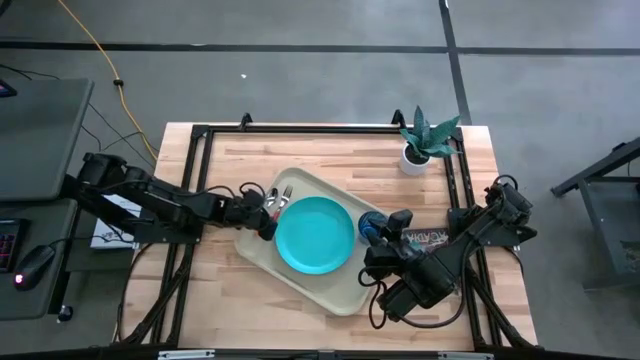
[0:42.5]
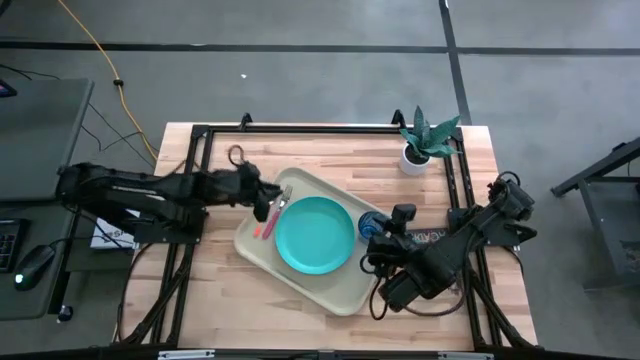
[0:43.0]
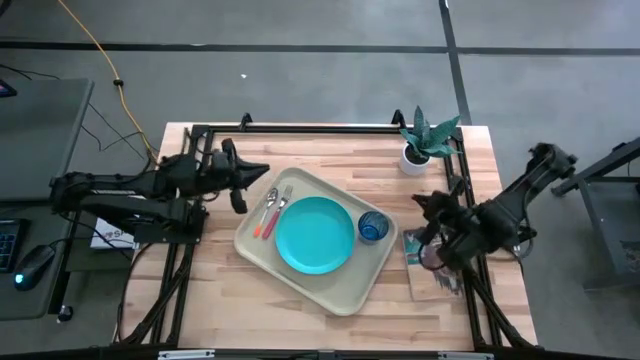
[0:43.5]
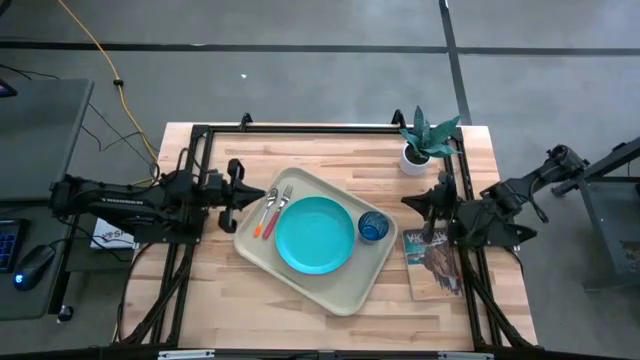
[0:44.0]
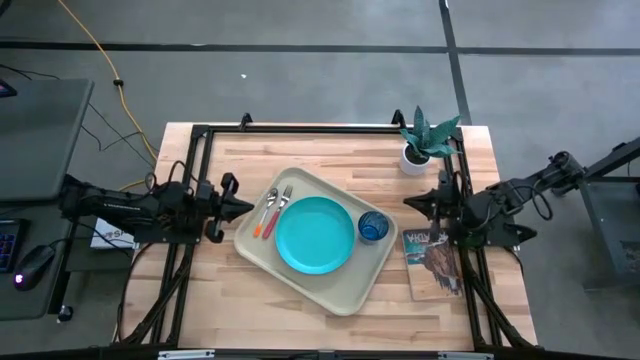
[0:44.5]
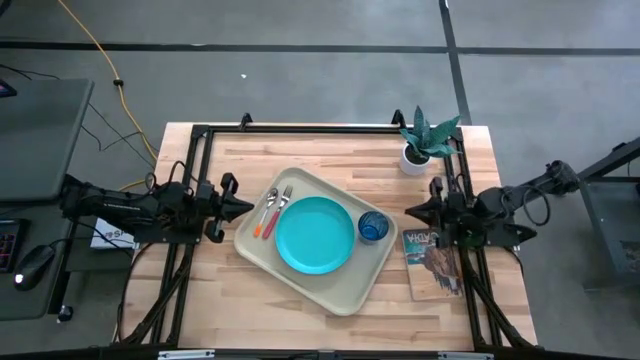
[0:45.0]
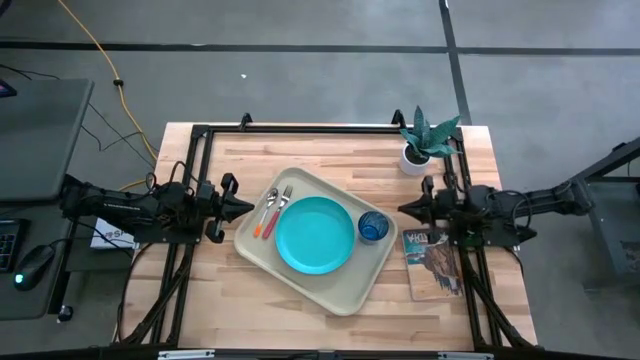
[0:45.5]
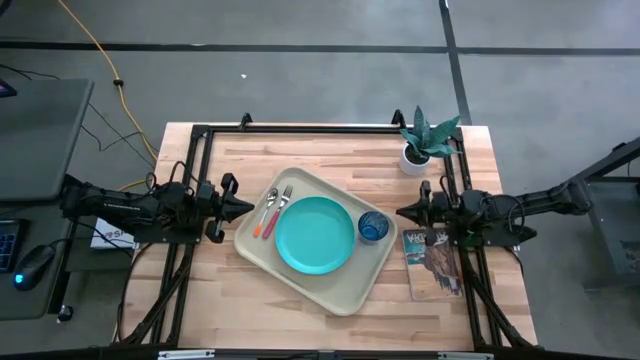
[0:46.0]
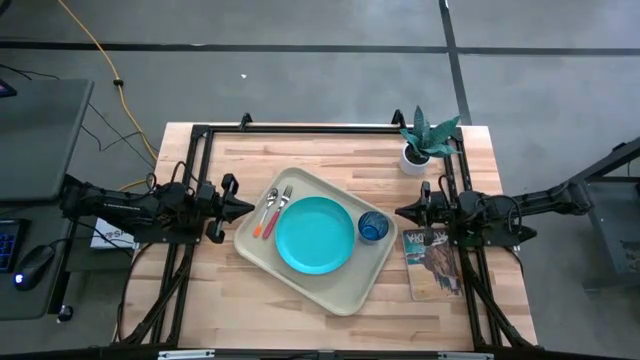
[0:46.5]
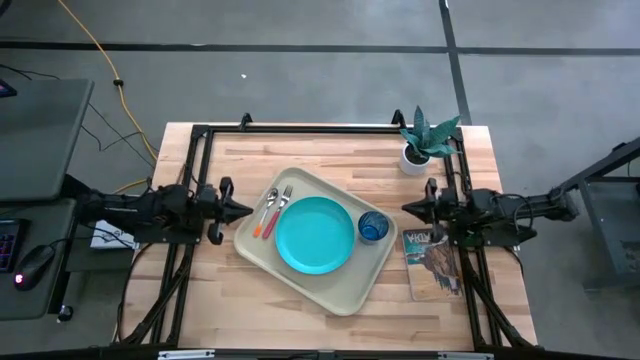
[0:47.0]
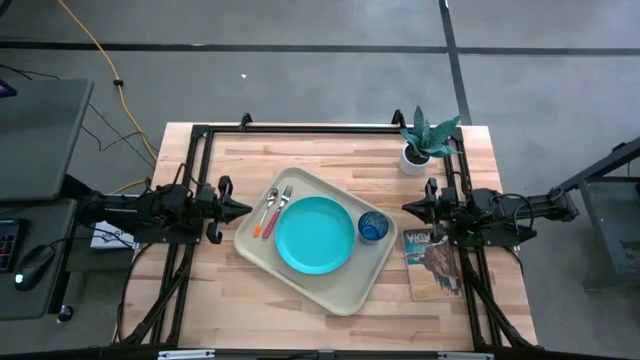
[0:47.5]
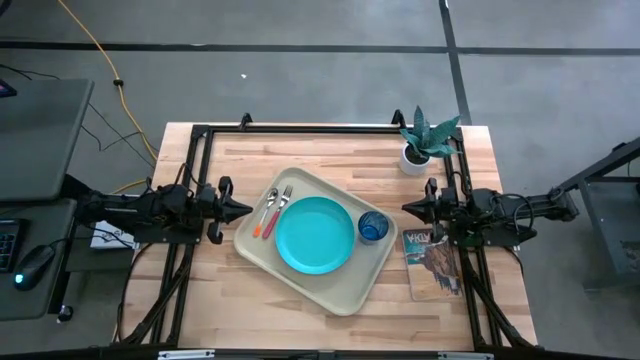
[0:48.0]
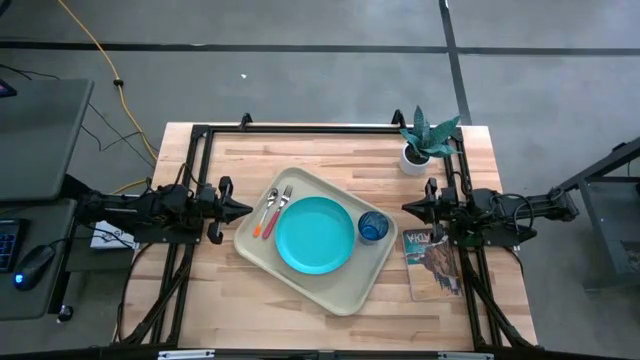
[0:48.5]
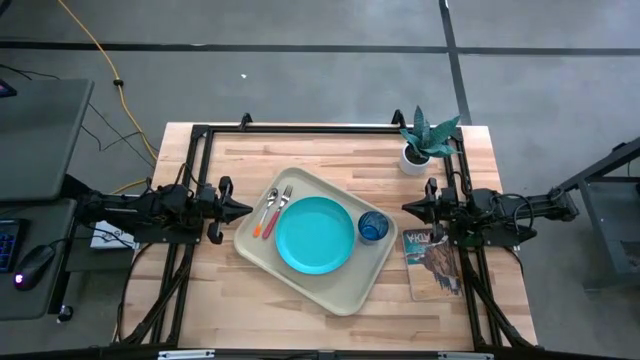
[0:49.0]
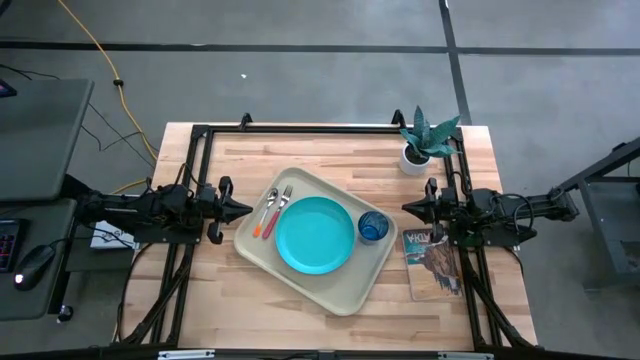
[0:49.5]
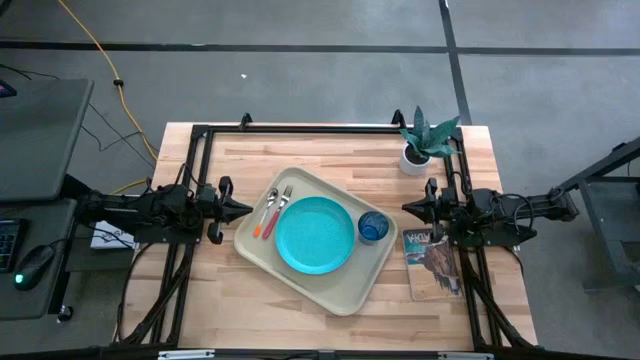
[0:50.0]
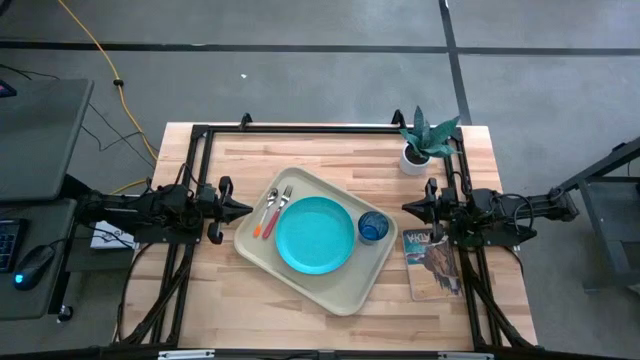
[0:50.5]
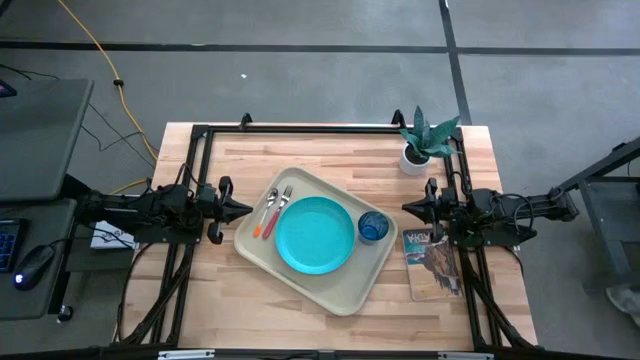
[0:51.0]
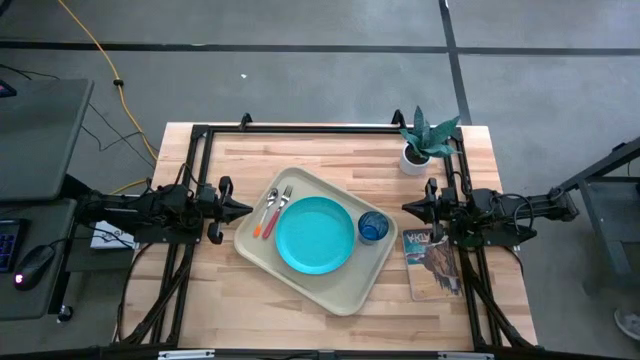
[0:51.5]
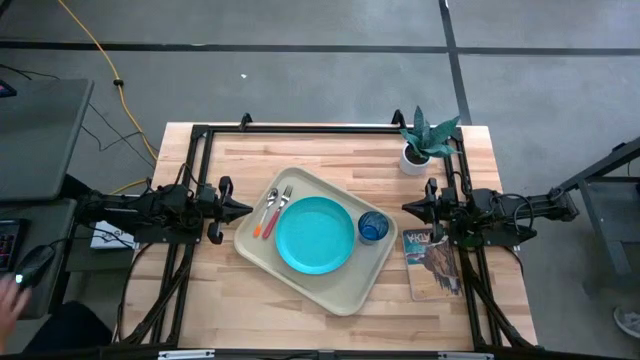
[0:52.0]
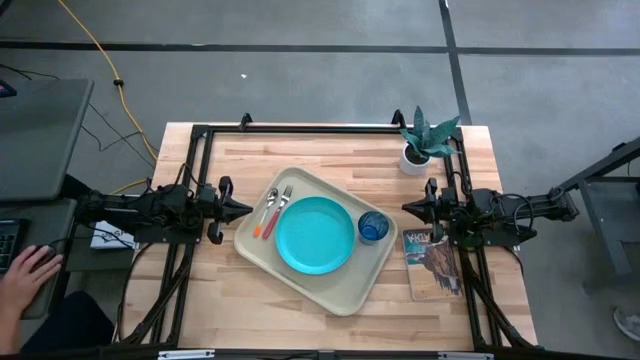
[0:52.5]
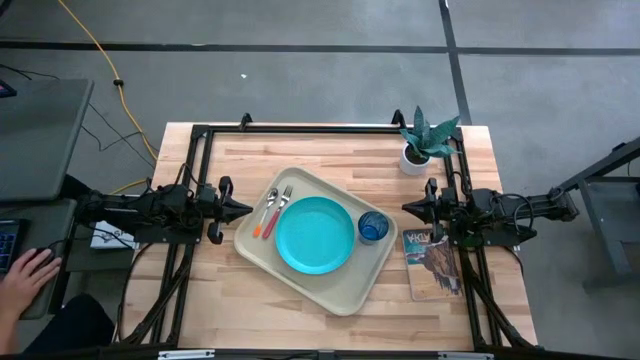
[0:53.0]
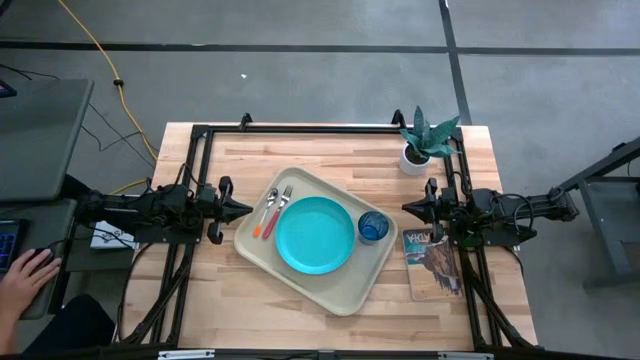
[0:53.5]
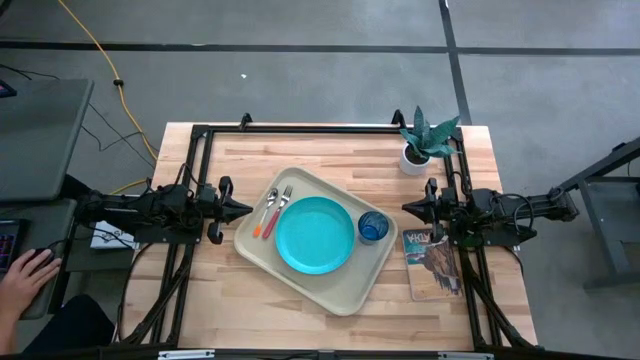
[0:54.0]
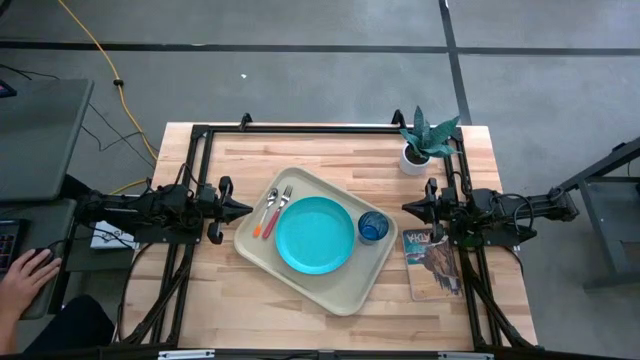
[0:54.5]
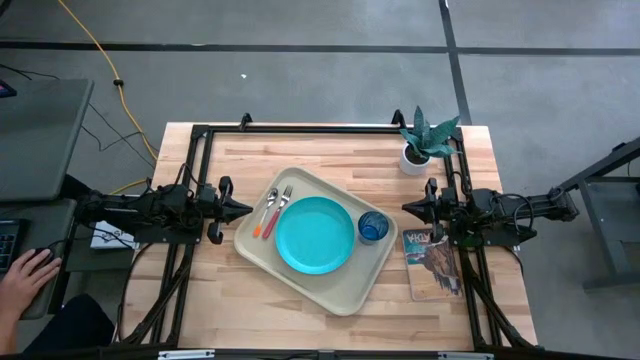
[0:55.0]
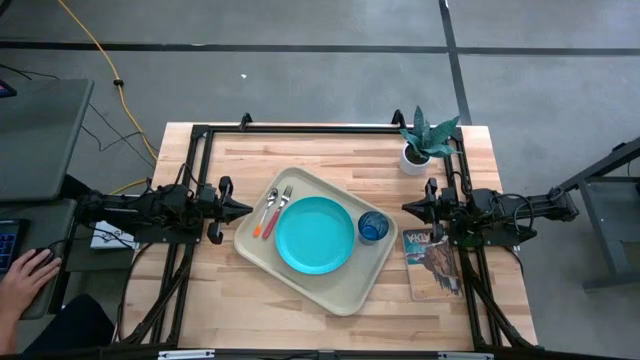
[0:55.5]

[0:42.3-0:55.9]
Task: Pick and place plate/cup/fork/spoon on tray
Return to Home Position

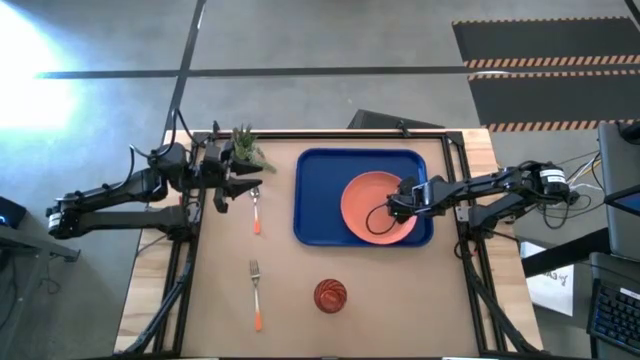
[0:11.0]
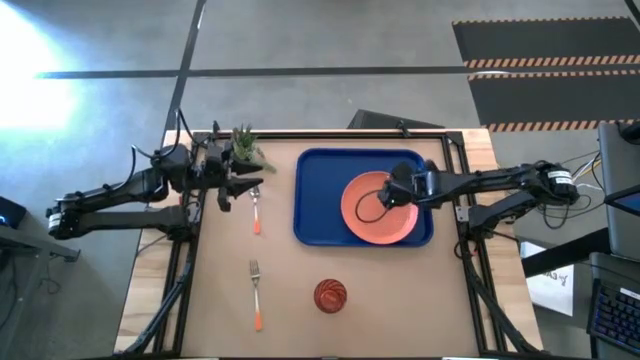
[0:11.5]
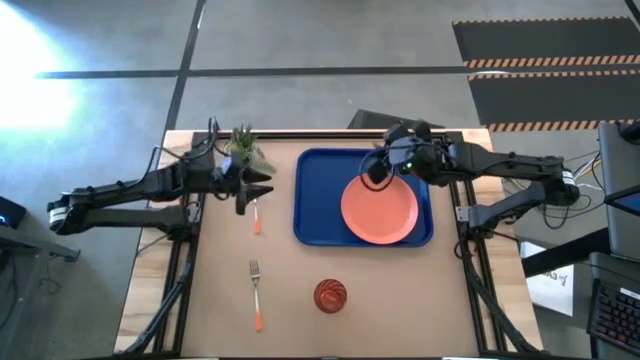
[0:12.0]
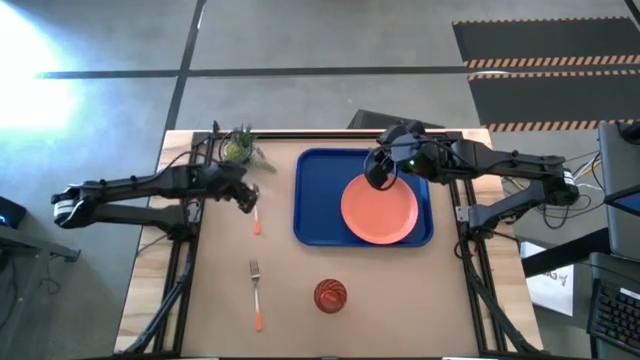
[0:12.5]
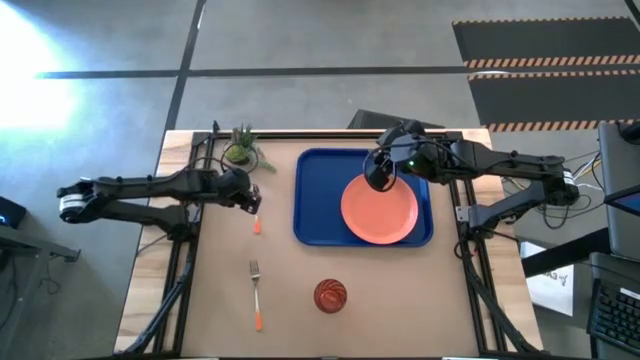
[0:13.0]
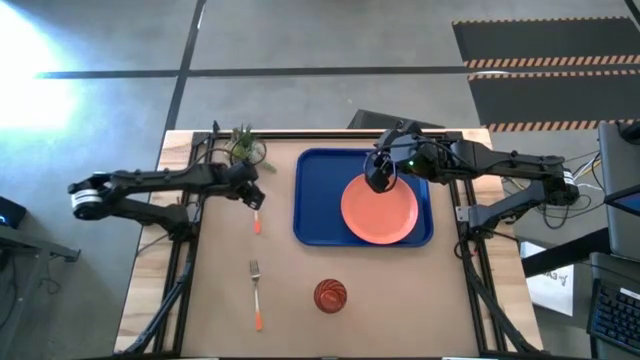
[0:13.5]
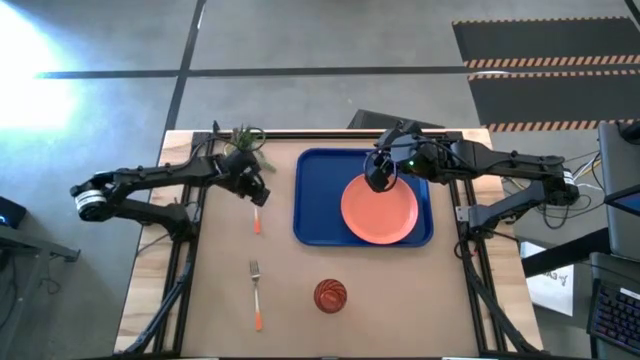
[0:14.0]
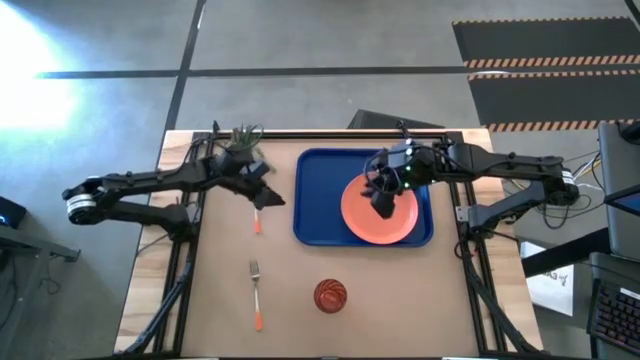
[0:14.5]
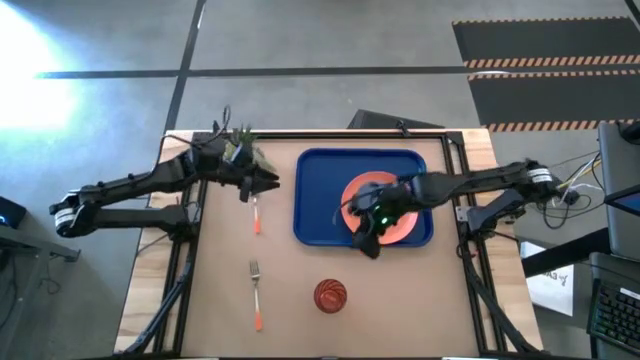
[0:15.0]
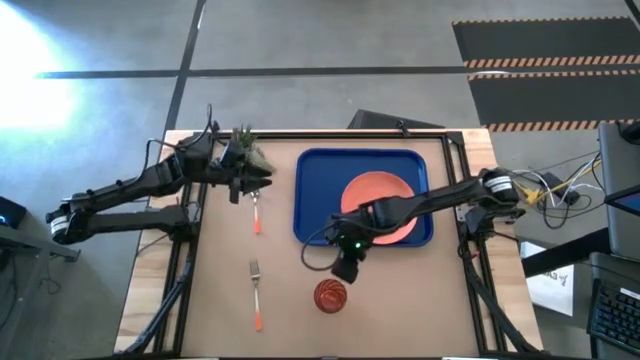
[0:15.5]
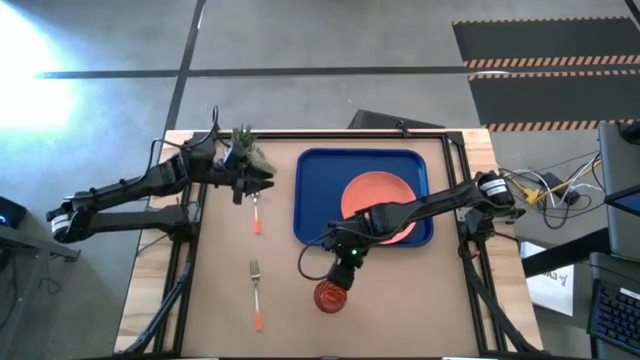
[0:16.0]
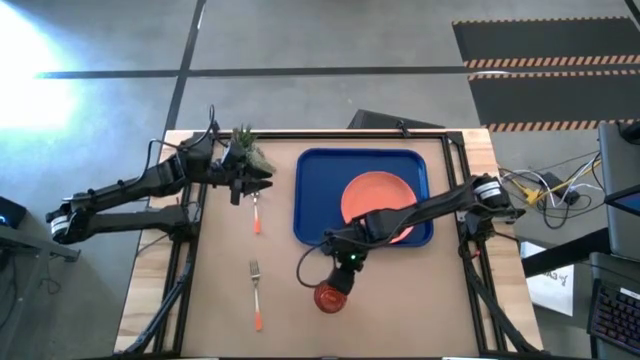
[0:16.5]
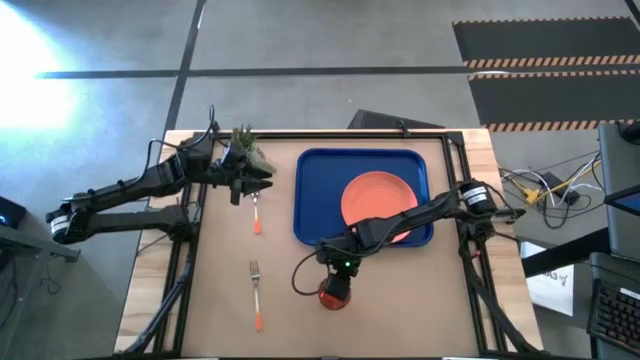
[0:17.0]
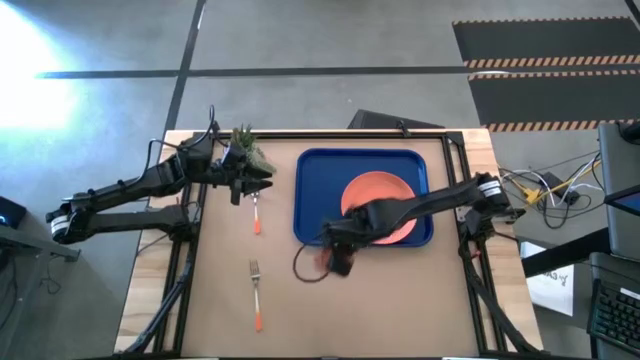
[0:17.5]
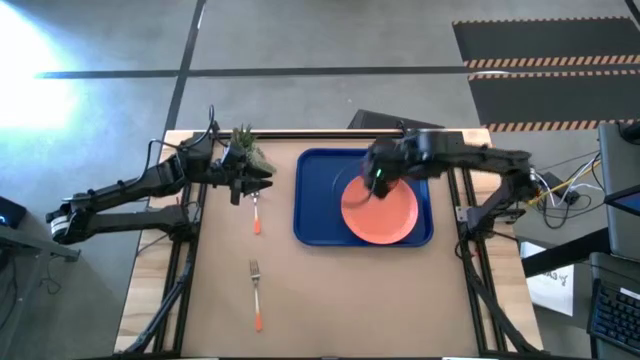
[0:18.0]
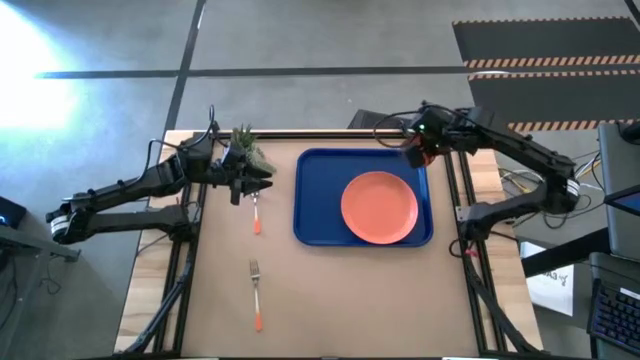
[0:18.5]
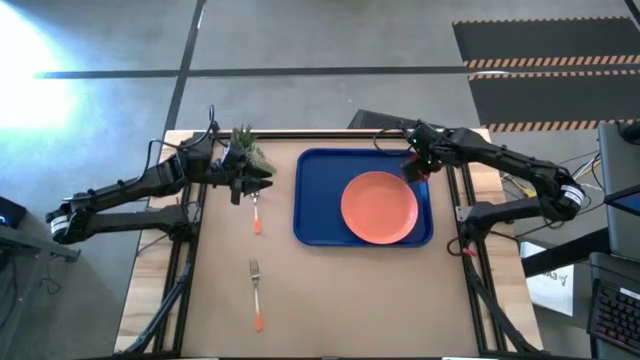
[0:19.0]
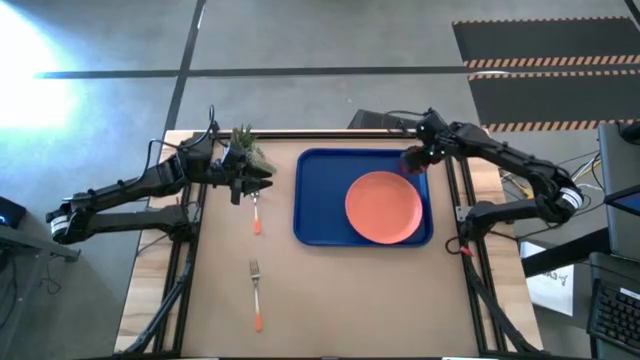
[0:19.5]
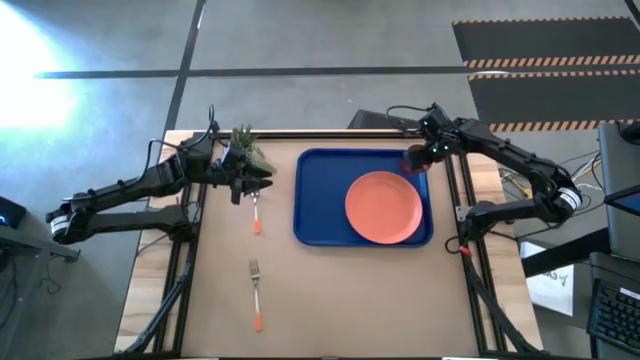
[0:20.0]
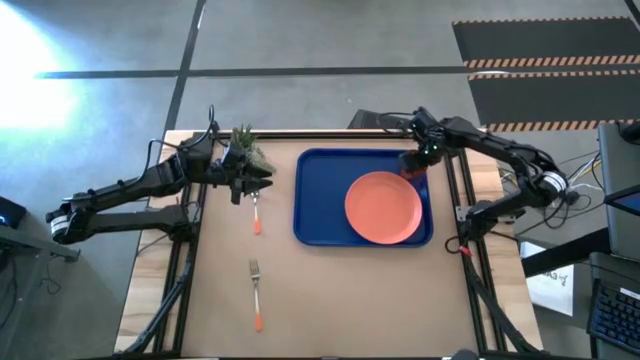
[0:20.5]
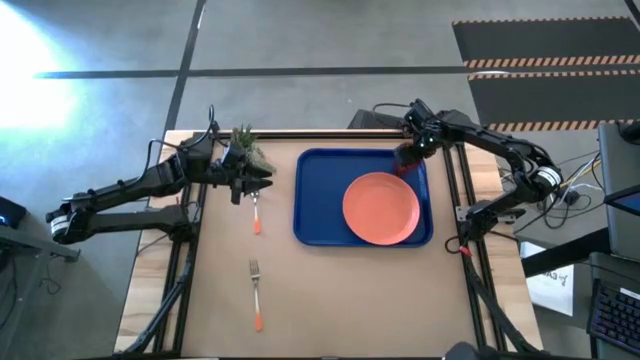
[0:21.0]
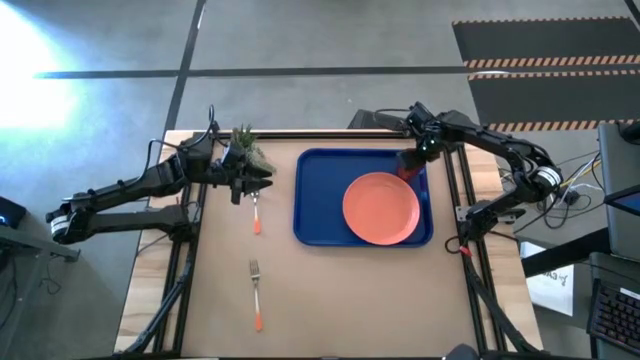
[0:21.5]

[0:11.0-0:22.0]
Task: Pick and place plate/cup/fork/spoon on tray
Put the orange glass on the blue serving tray to the top right of the orange plate
